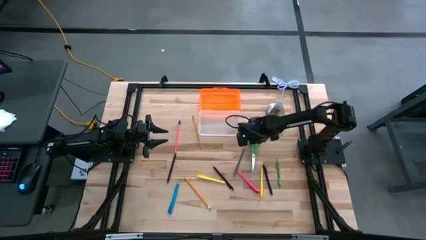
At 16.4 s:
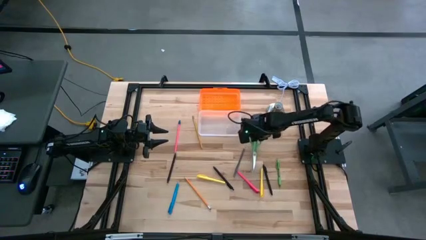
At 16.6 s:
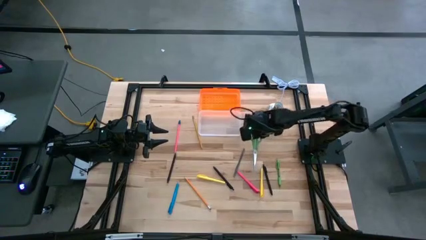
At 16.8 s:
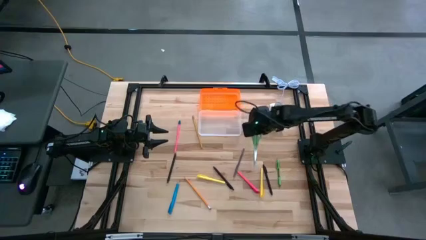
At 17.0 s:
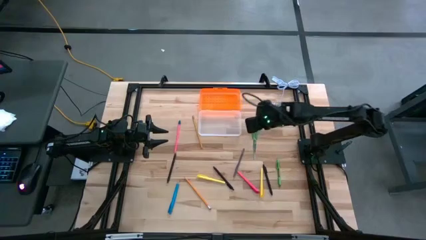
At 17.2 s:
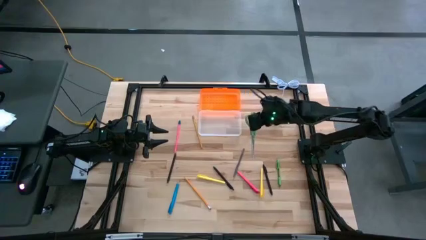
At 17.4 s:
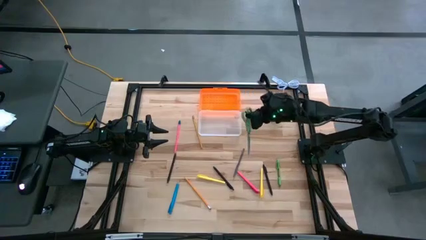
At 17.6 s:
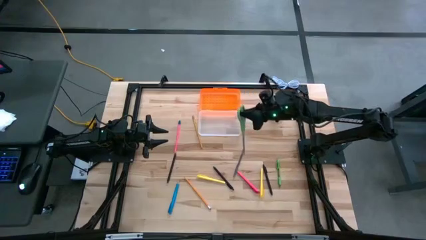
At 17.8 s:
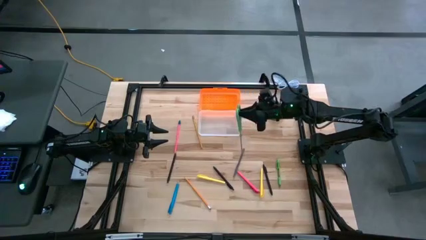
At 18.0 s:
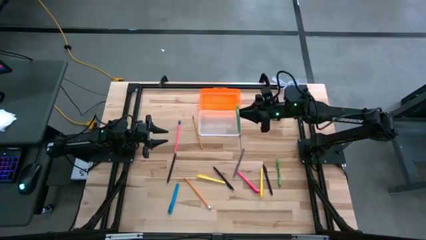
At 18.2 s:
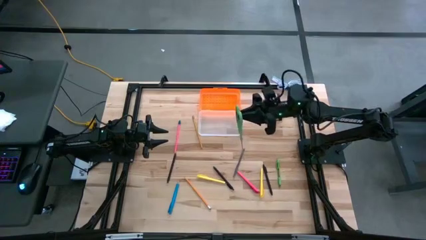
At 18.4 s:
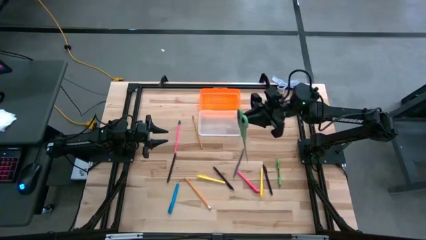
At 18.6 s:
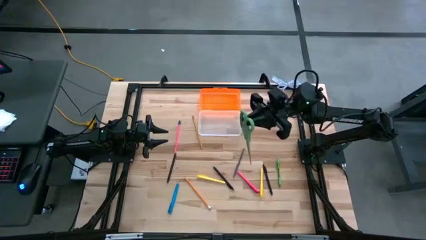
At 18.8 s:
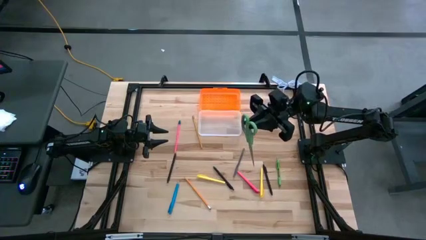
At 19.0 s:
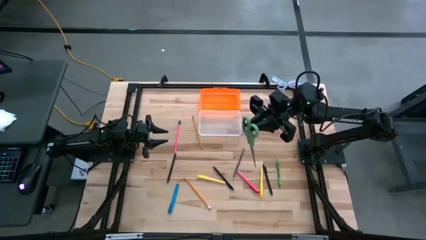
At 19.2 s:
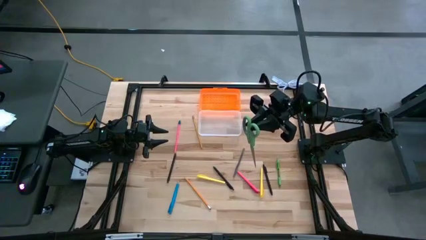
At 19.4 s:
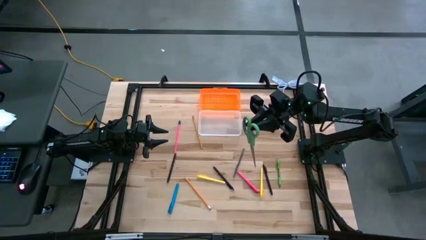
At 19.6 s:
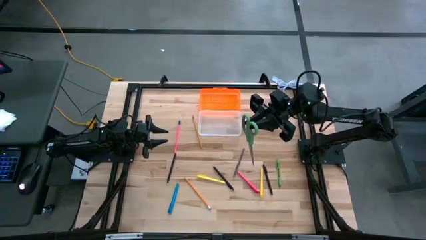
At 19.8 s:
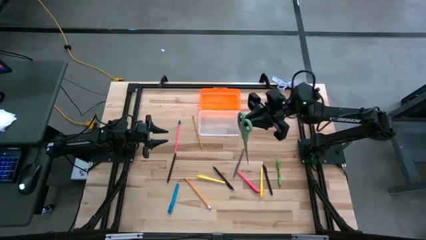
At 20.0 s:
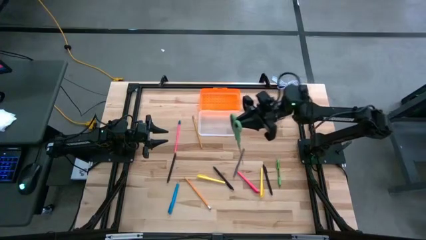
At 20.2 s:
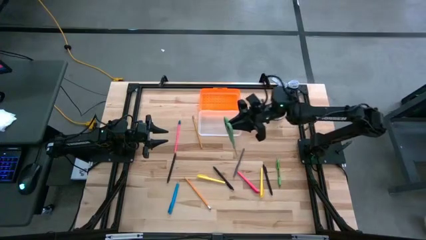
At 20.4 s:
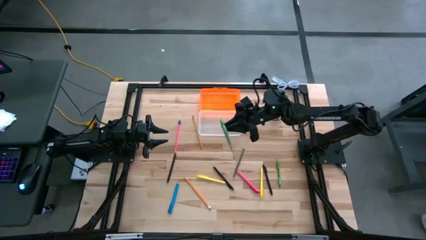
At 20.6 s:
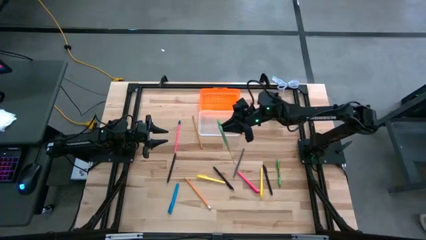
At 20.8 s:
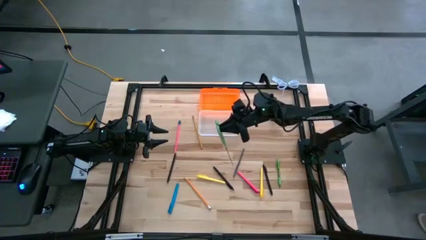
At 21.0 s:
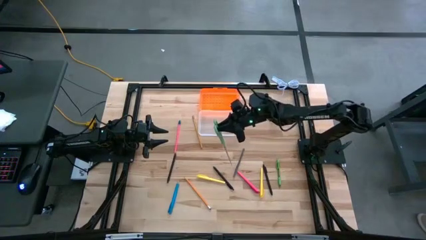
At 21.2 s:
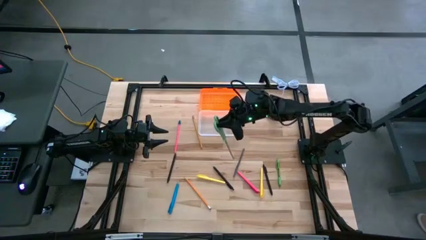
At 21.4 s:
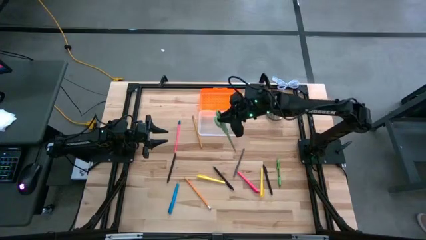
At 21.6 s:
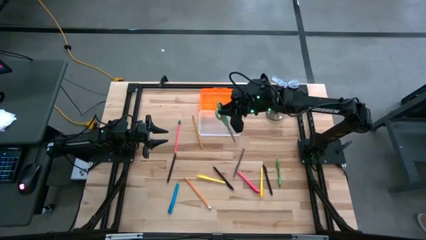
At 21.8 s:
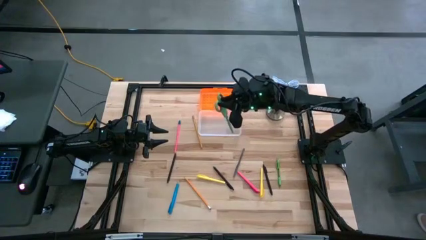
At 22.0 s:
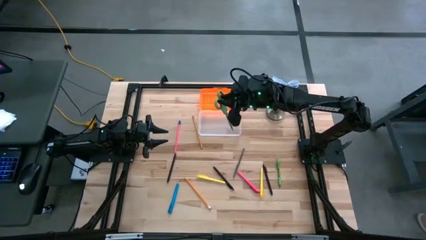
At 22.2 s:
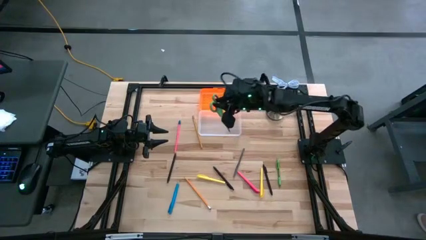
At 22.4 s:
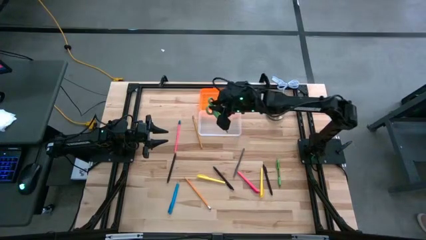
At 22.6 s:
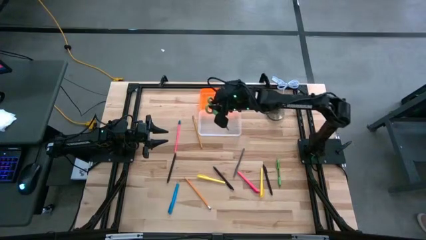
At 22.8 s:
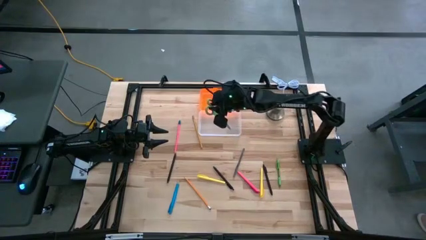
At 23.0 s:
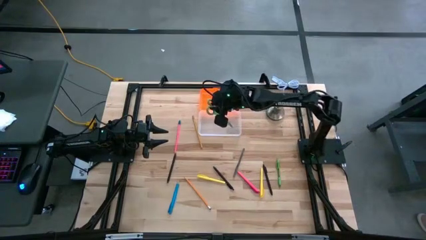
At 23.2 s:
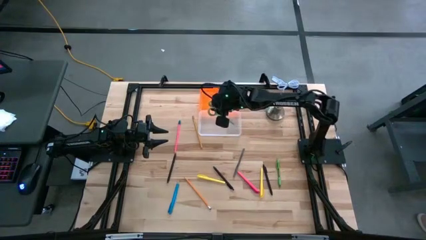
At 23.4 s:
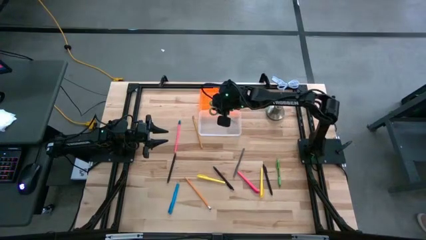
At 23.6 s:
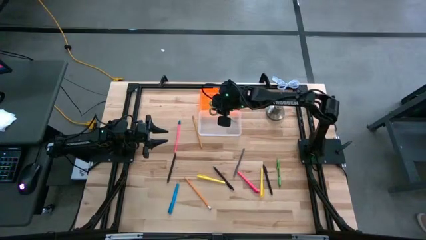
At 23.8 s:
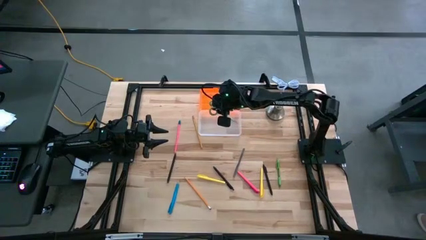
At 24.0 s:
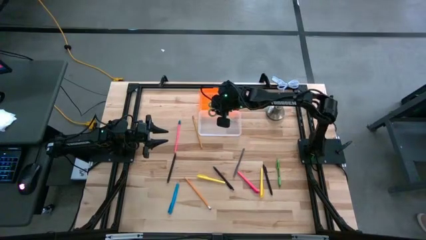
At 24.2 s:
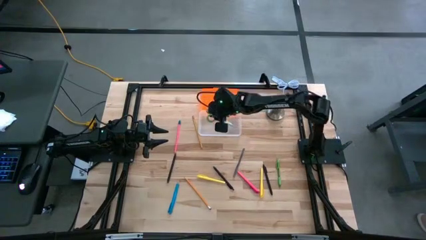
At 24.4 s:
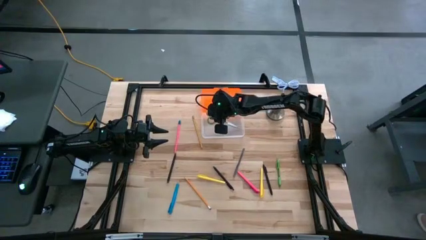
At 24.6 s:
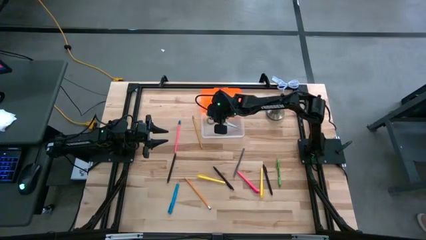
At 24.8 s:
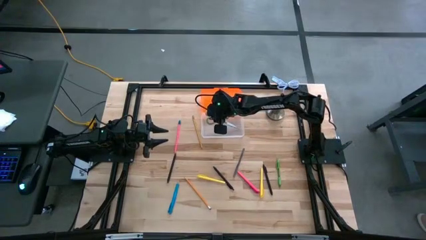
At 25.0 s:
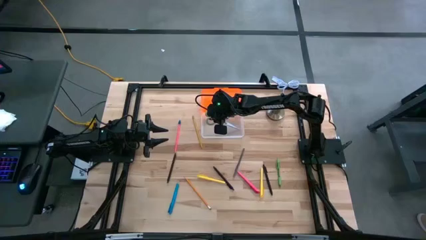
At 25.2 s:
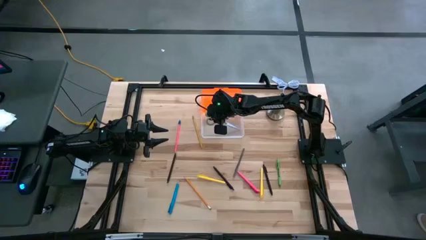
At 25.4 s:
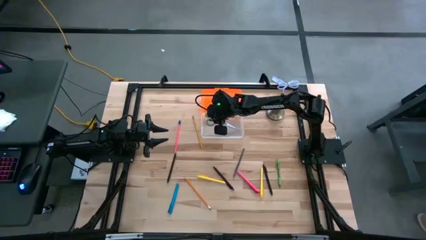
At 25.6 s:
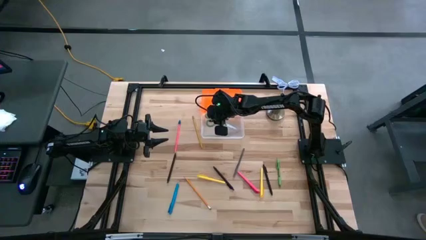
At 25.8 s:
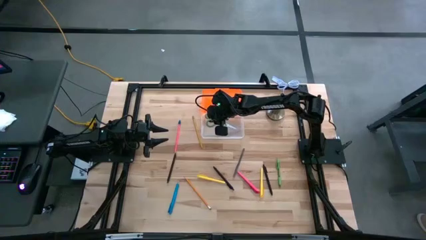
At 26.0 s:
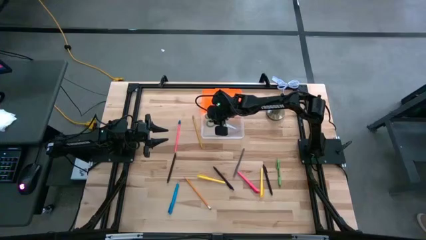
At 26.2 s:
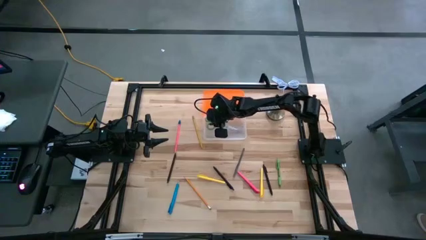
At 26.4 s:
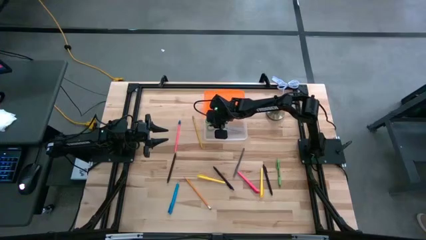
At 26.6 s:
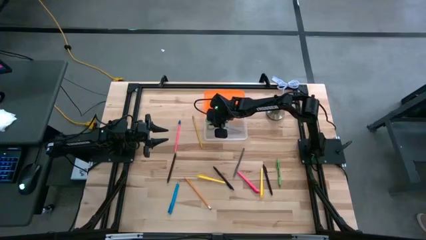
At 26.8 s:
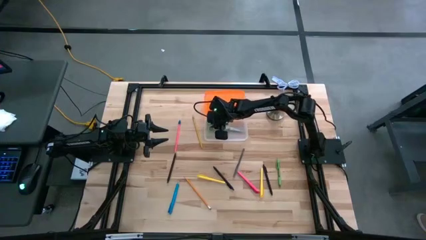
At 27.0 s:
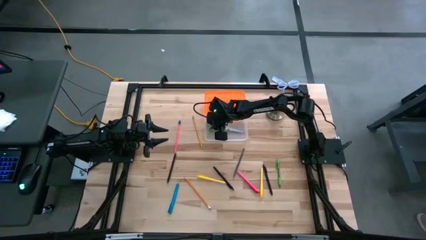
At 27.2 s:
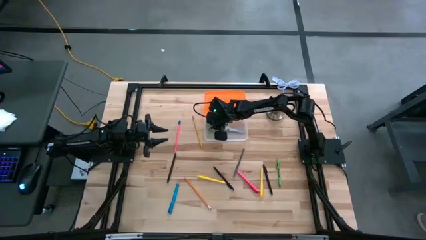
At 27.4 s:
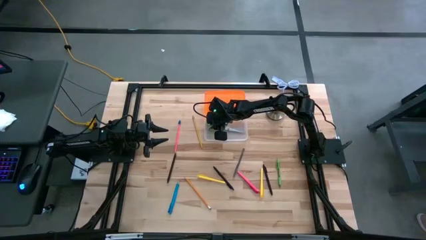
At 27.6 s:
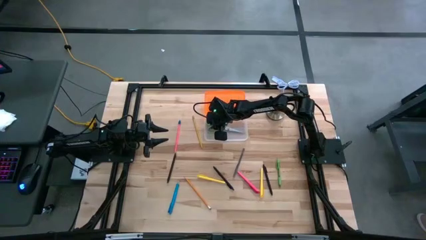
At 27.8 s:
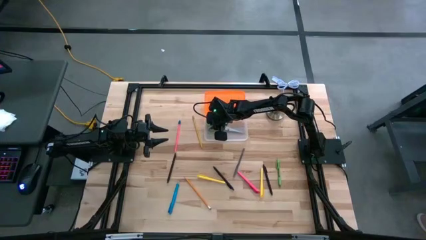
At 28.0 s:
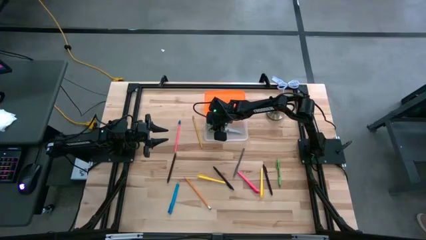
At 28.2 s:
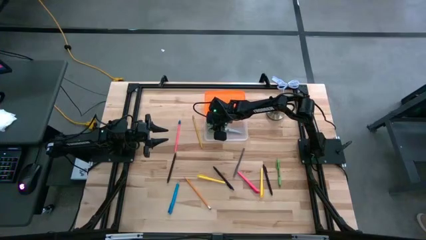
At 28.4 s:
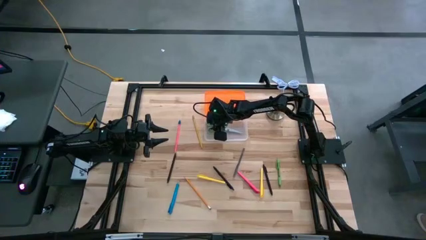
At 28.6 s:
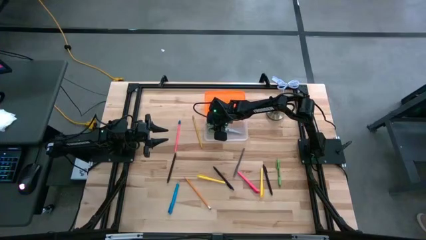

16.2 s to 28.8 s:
Task: Pick & place school supplies into a supply box
Put the green scissors into the supply box
